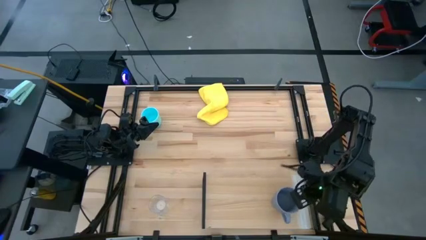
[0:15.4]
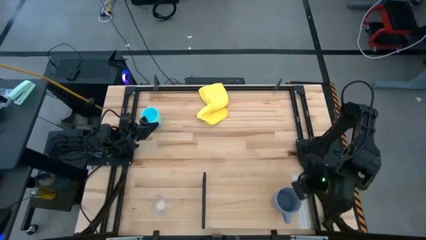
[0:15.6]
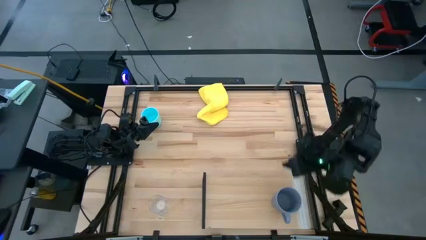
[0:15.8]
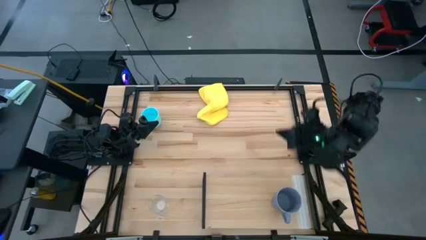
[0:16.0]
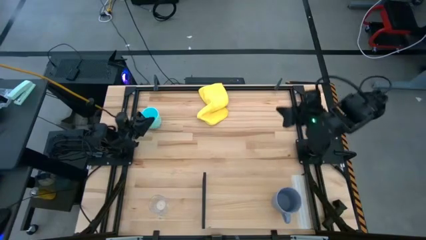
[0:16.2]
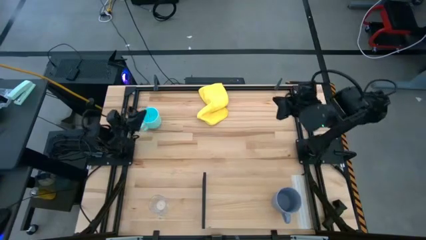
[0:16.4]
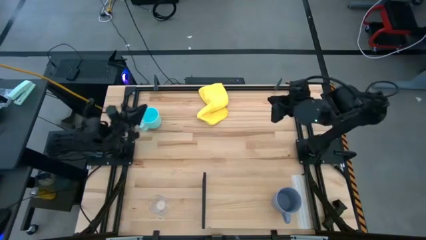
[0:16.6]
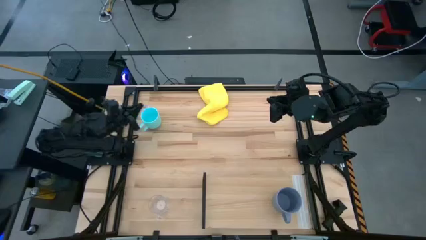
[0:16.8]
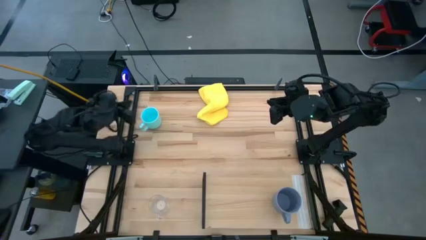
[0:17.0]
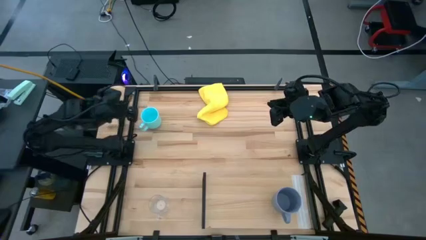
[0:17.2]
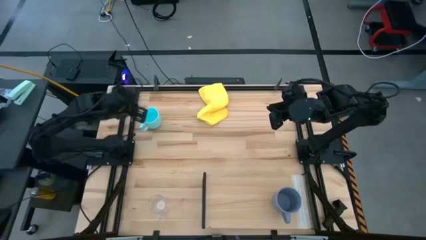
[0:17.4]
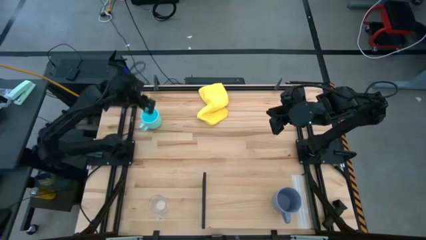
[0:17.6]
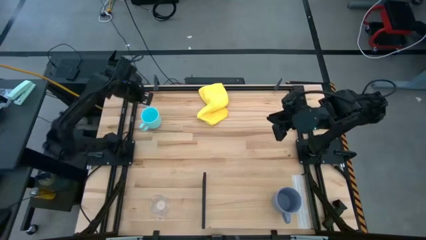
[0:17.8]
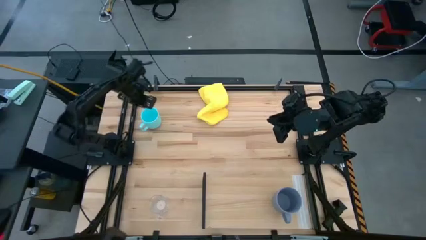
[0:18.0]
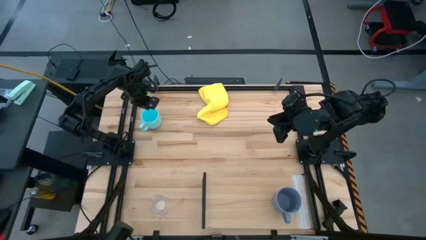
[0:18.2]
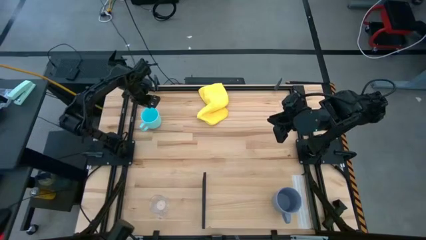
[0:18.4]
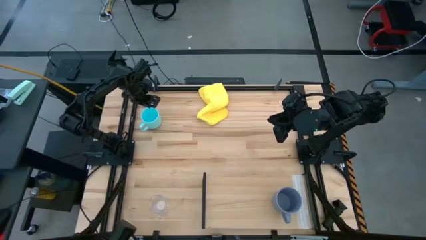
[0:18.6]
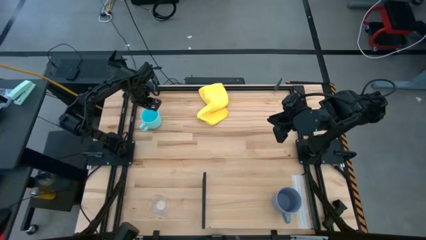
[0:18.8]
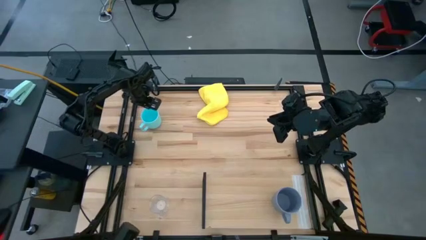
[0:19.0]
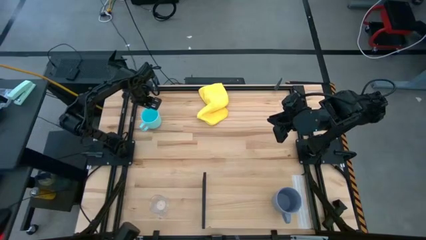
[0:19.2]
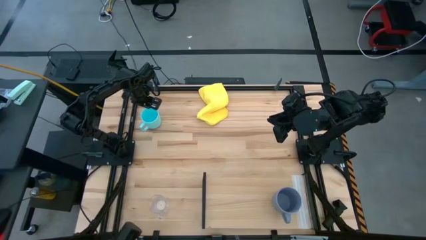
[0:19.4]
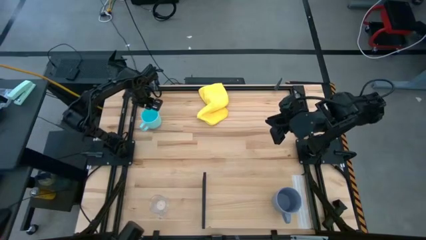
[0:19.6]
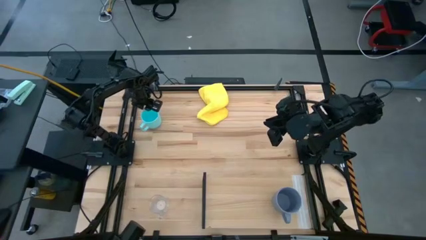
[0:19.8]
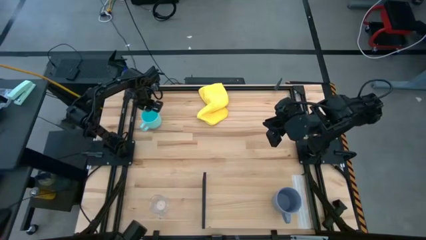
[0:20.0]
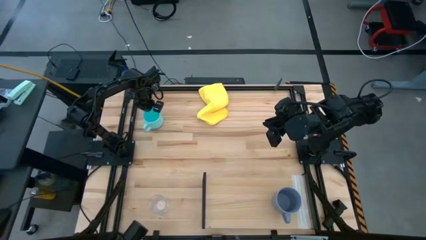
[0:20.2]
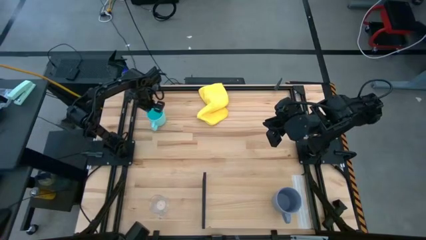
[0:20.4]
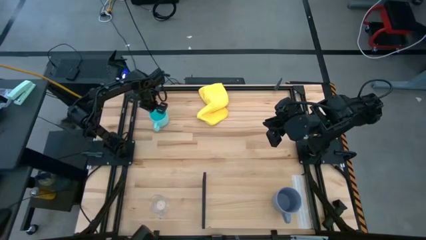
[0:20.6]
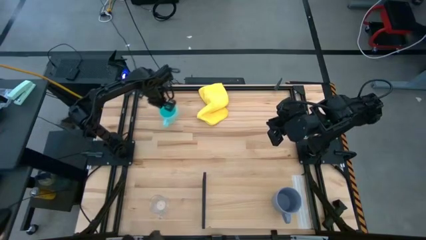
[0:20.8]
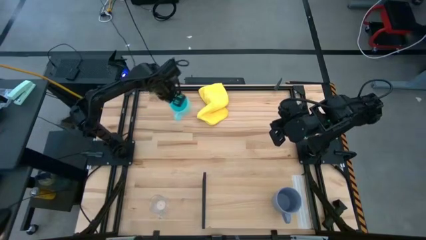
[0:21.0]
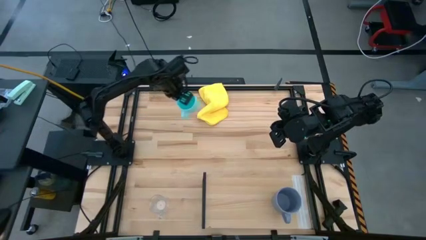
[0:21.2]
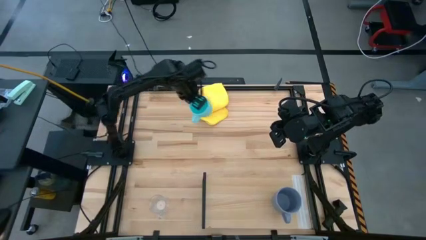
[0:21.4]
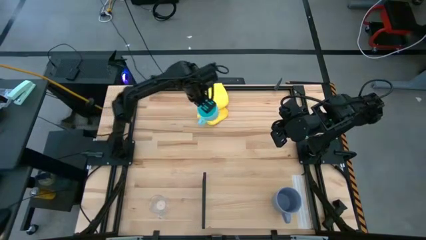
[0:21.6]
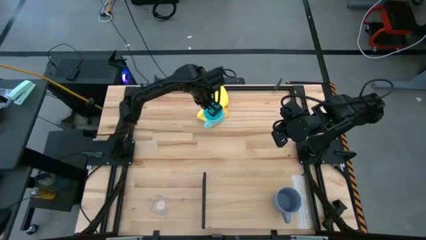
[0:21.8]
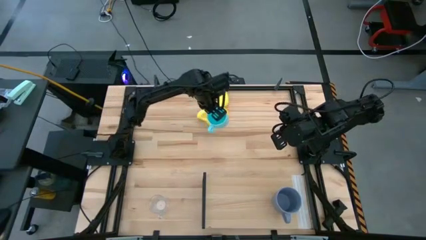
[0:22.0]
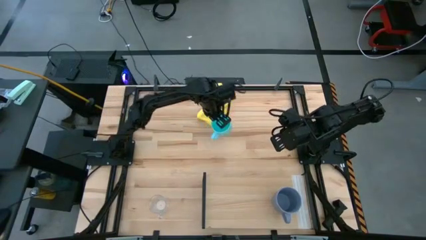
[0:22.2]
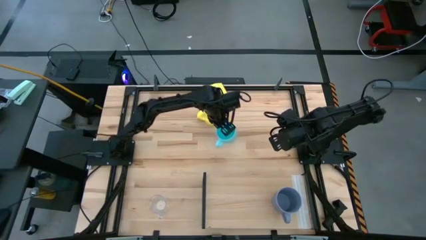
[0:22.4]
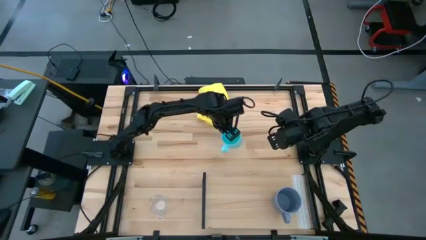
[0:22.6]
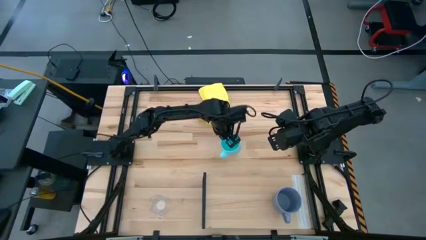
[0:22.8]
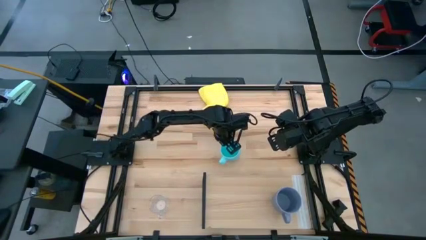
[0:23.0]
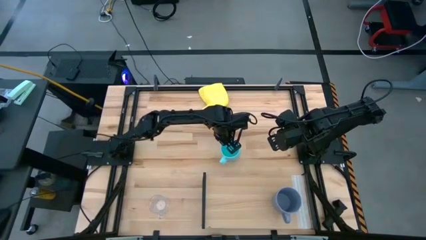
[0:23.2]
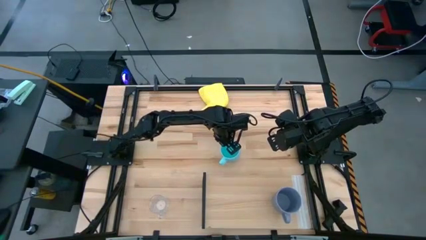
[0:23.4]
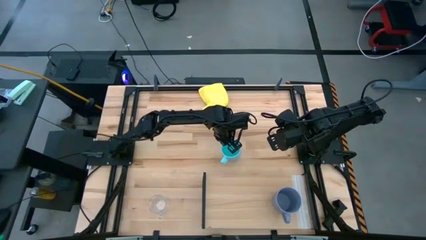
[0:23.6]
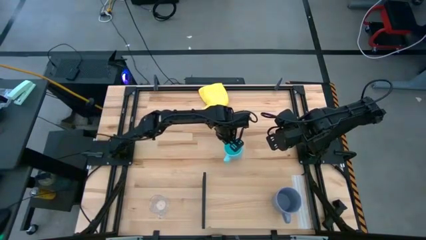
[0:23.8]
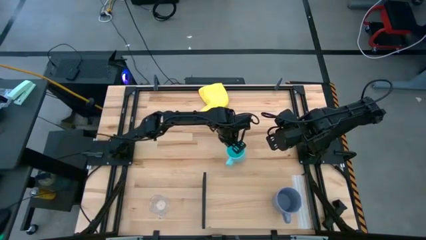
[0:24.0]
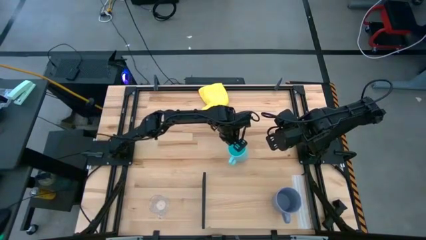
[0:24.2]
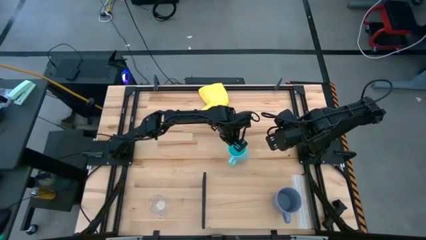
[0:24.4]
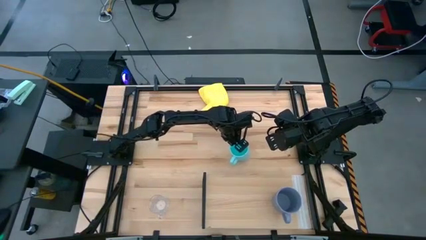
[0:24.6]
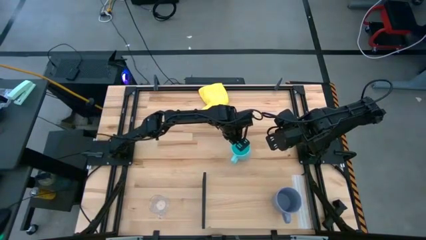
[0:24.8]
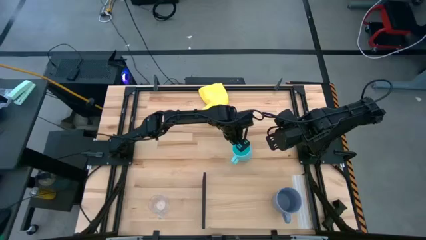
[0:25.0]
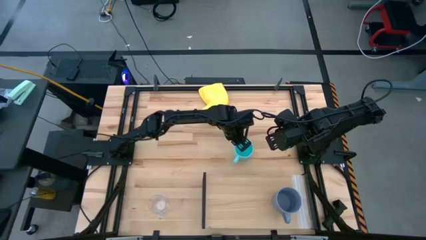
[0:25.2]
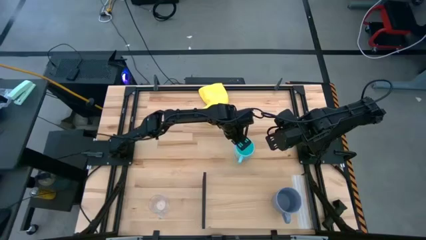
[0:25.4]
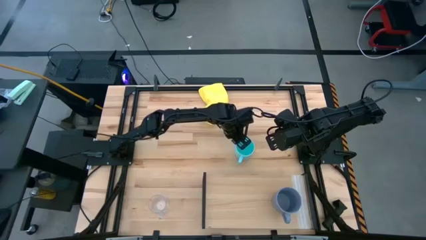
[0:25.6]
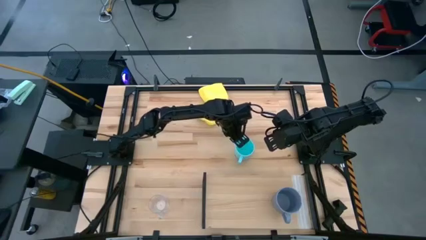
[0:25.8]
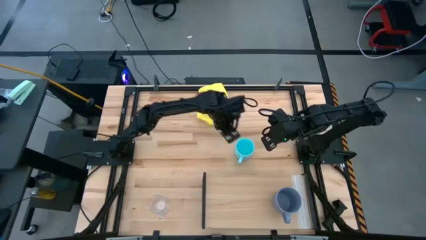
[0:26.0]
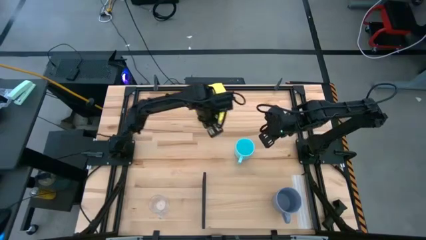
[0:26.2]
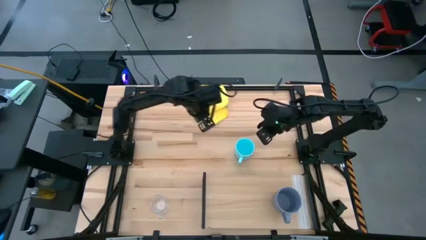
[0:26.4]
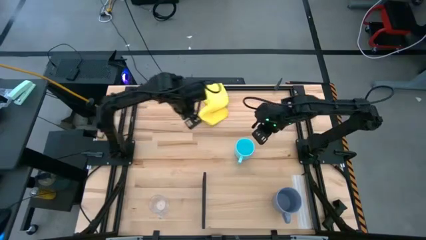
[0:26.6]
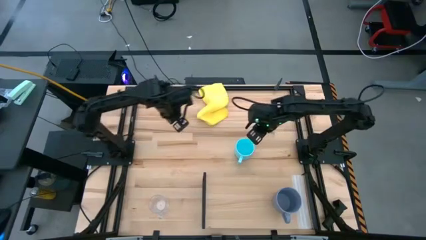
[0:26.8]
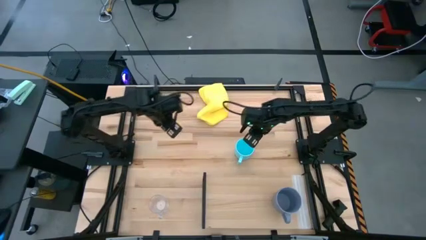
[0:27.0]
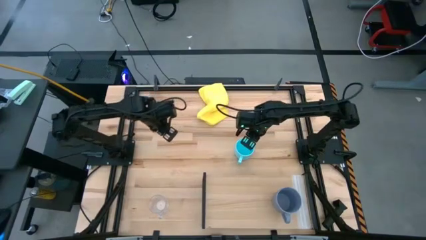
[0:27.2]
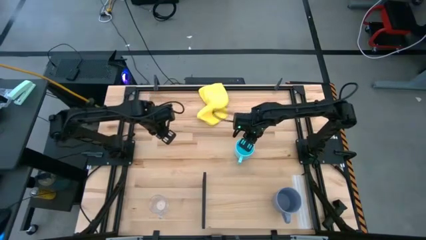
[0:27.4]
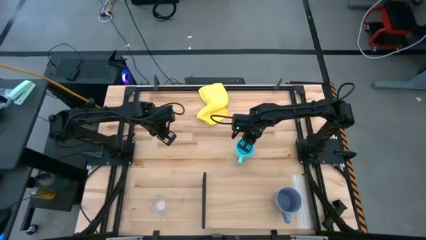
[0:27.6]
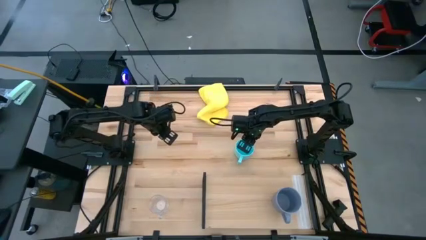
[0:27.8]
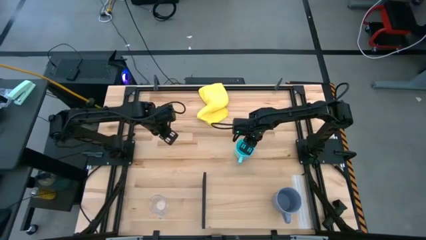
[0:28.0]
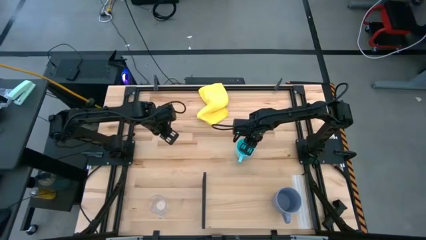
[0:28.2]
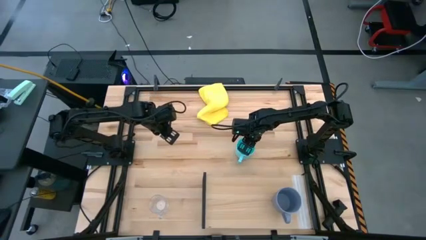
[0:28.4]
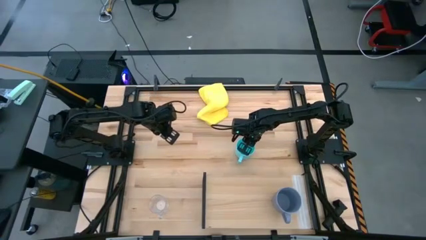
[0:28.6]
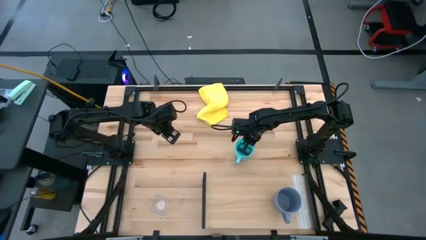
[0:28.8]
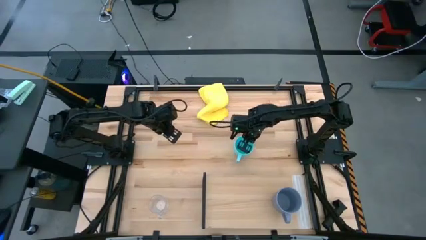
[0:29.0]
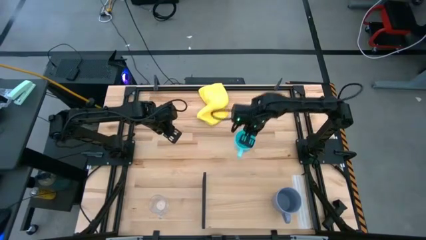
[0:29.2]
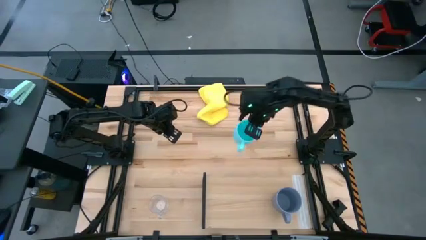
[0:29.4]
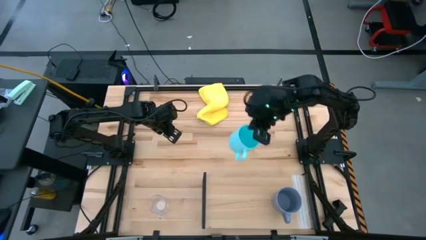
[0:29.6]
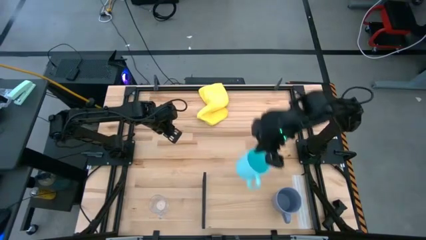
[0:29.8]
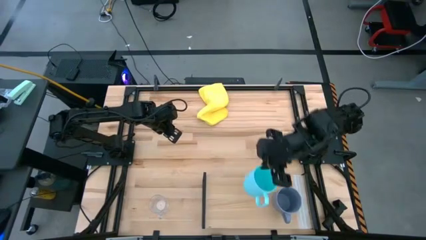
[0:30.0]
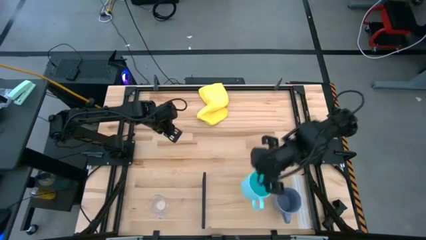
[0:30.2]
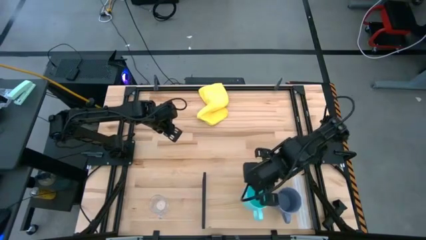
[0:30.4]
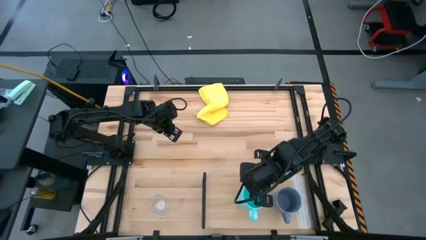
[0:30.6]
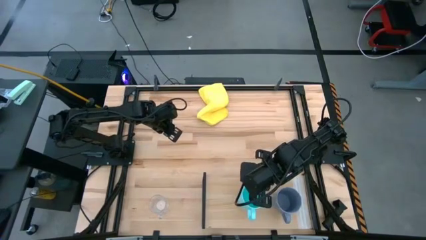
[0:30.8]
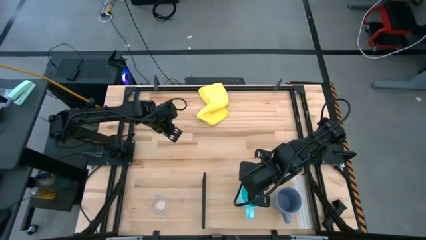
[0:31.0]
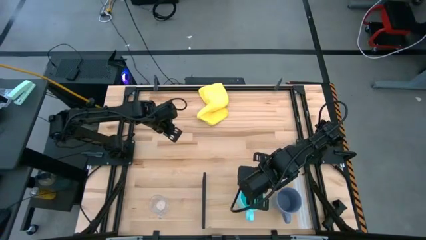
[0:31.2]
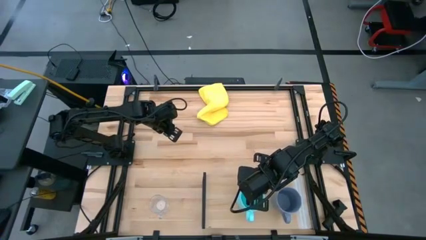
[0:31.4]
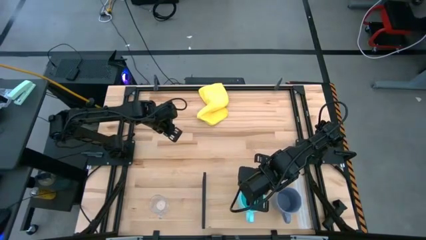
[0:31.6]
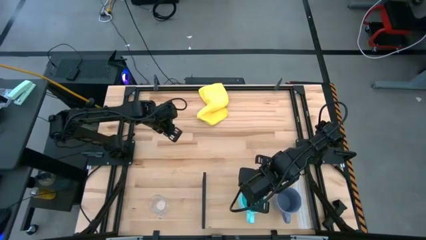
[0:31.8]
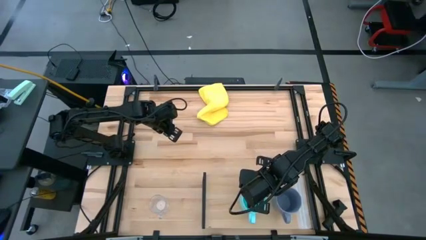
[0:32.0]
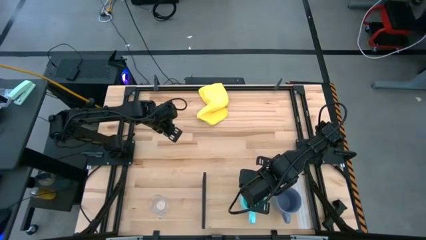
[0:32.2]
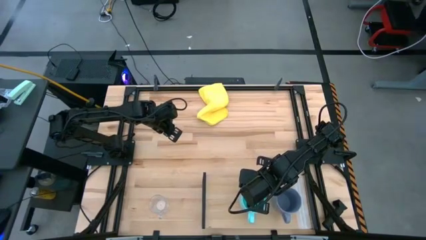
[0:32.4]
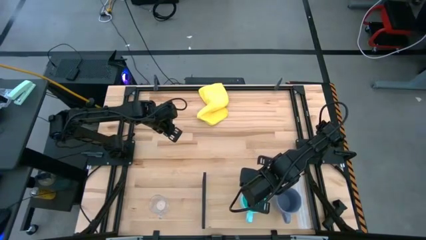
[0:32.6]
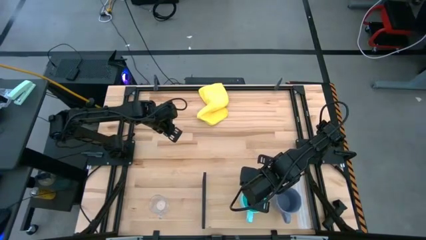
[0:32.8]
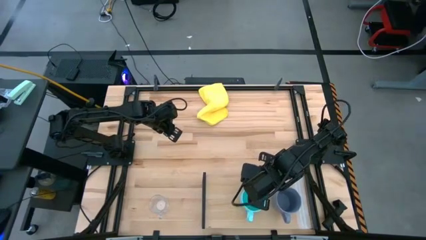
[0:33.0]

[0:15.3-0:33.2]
Task: Stack small to large cups/mugs on shelf
Put the blue mug on the shelf
